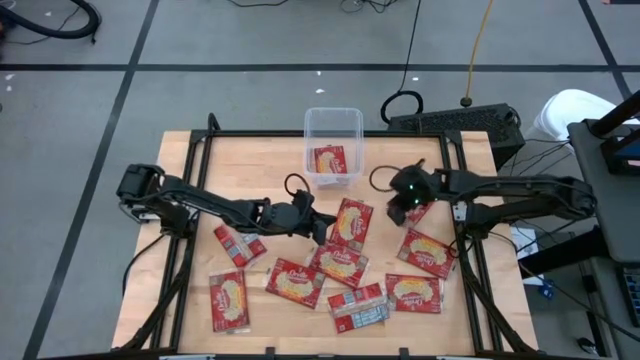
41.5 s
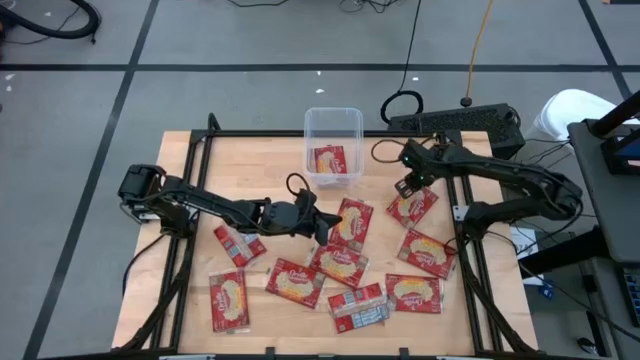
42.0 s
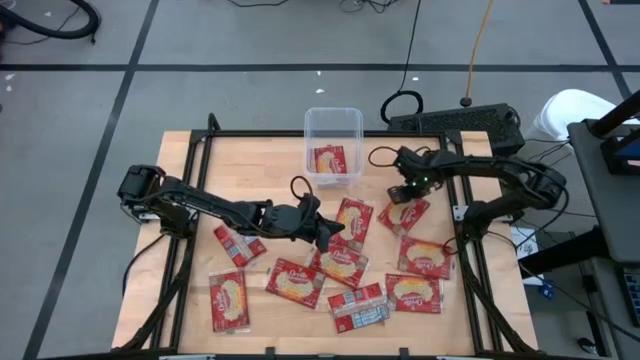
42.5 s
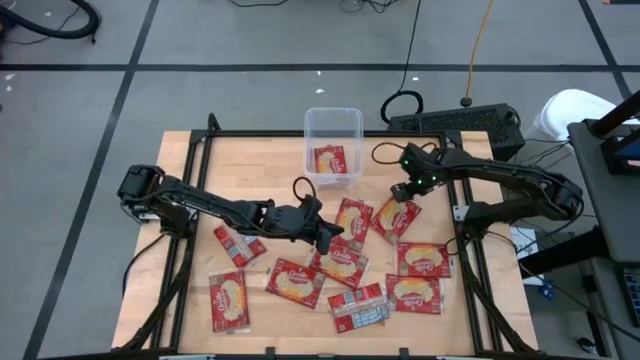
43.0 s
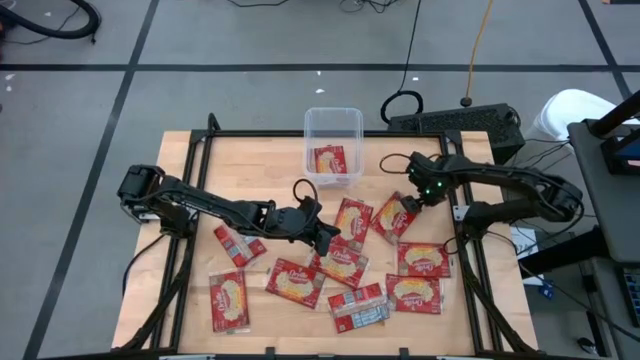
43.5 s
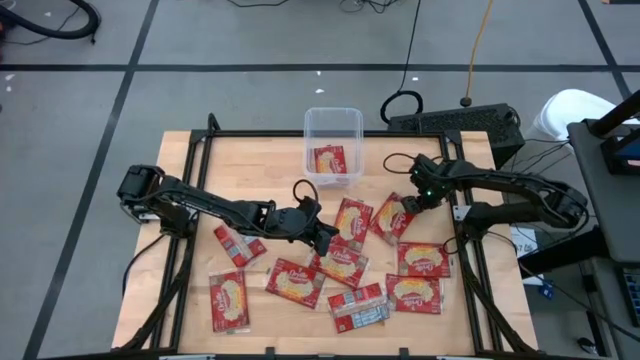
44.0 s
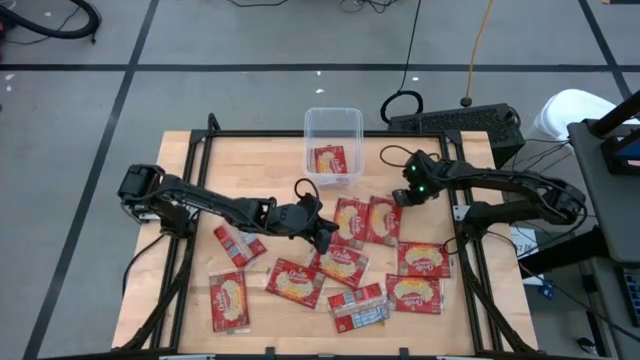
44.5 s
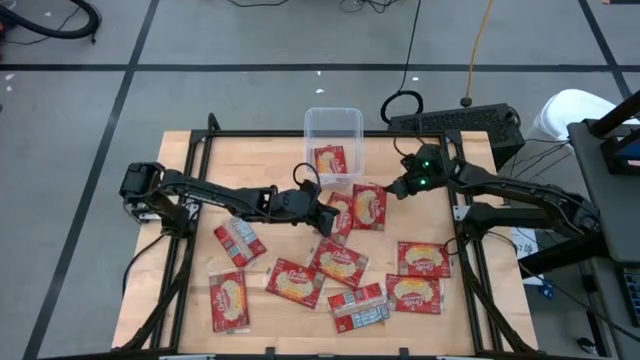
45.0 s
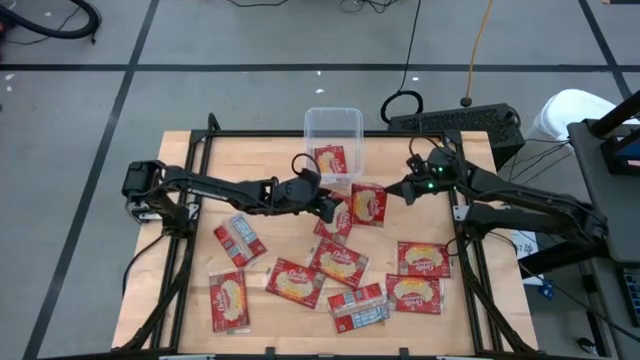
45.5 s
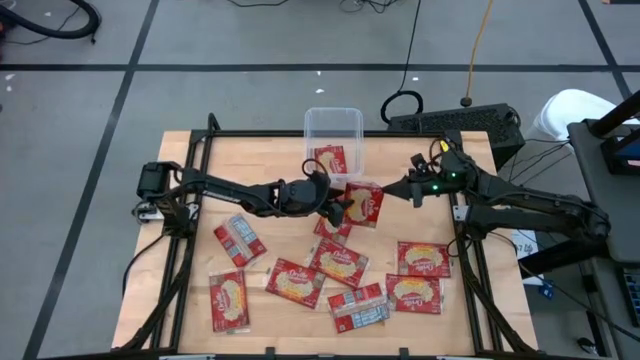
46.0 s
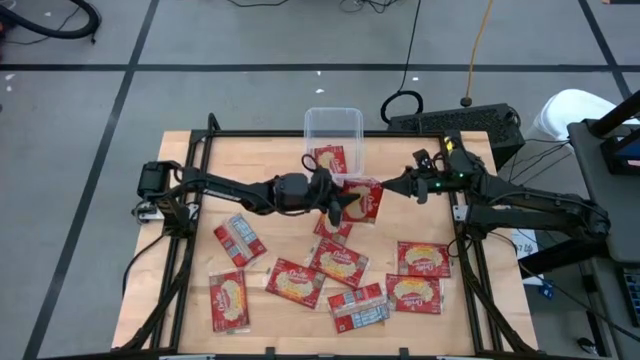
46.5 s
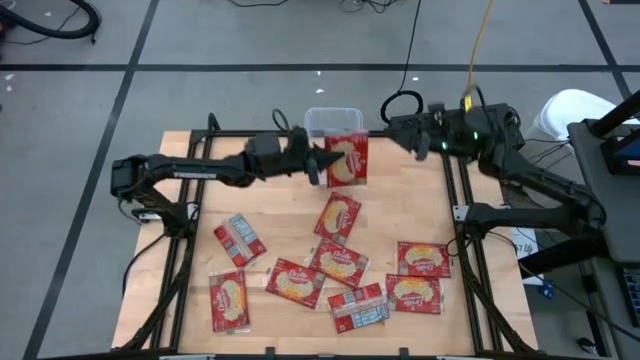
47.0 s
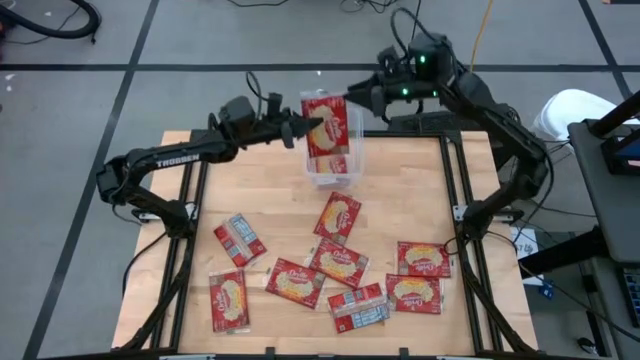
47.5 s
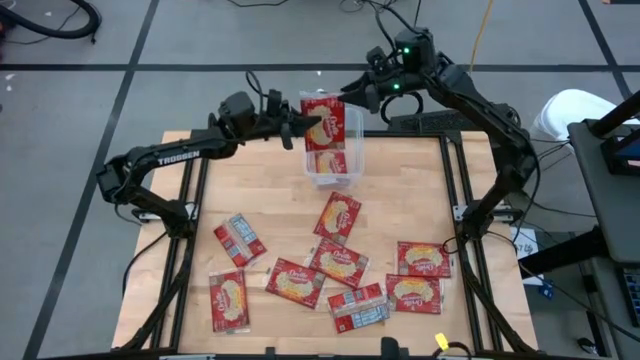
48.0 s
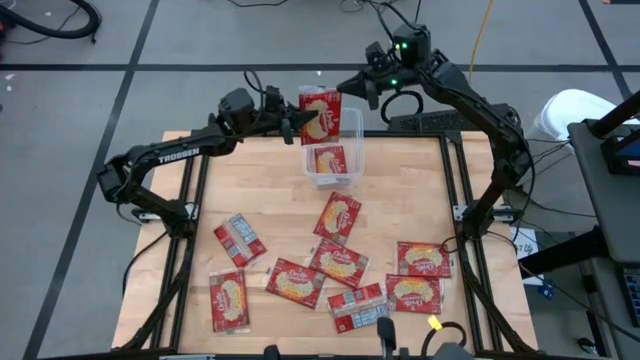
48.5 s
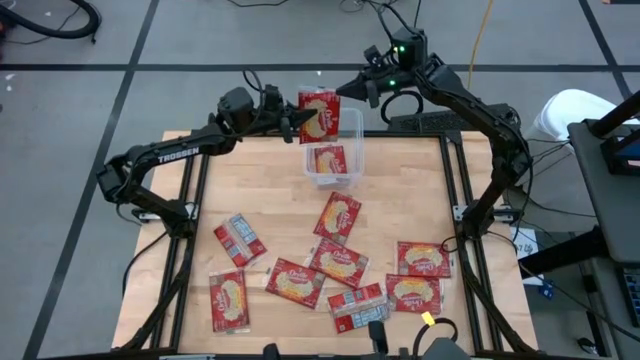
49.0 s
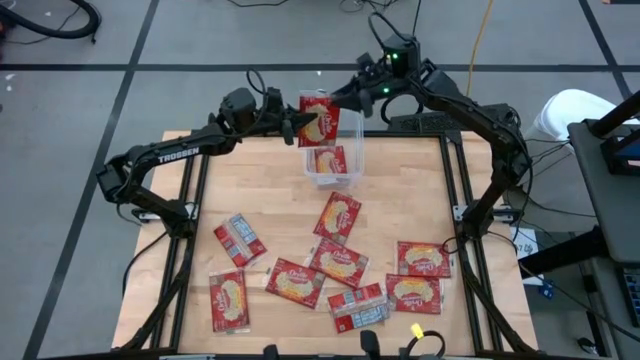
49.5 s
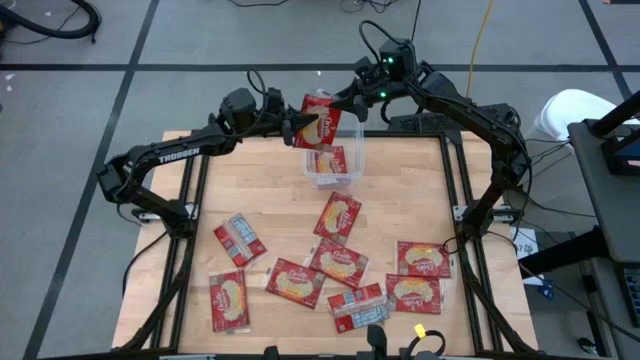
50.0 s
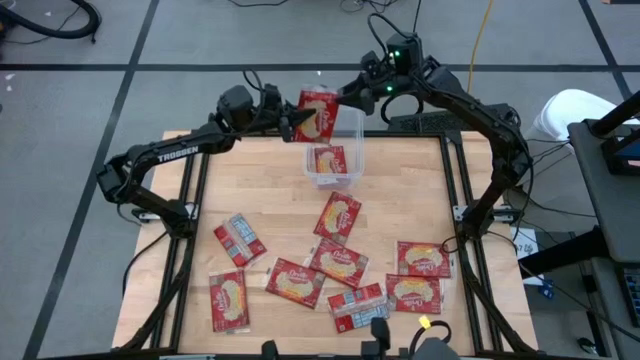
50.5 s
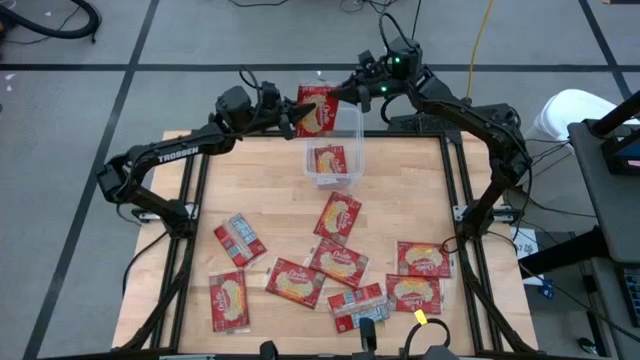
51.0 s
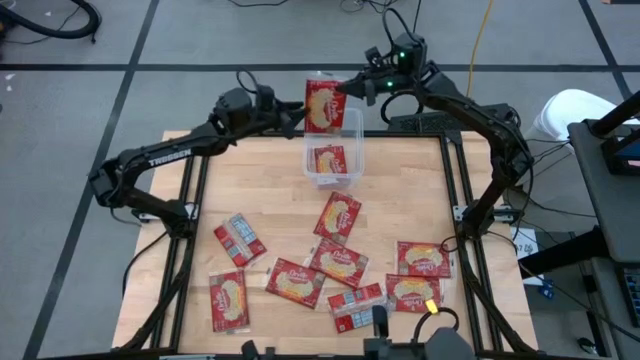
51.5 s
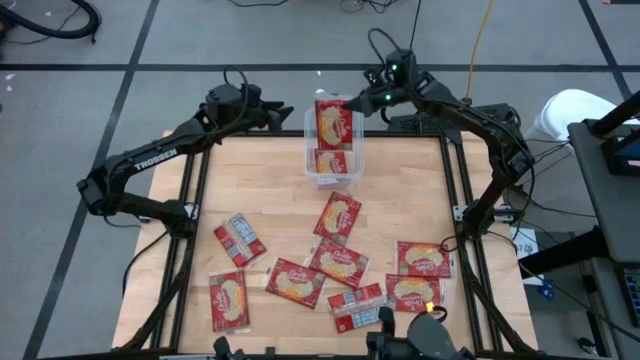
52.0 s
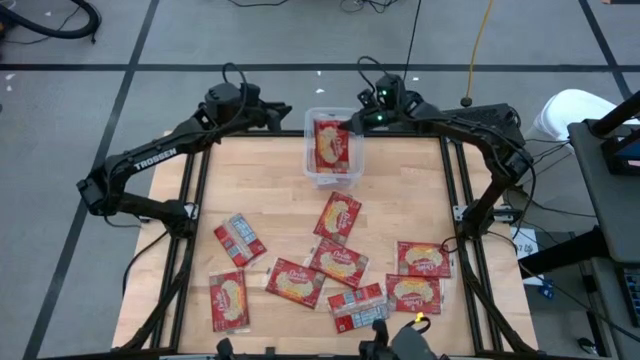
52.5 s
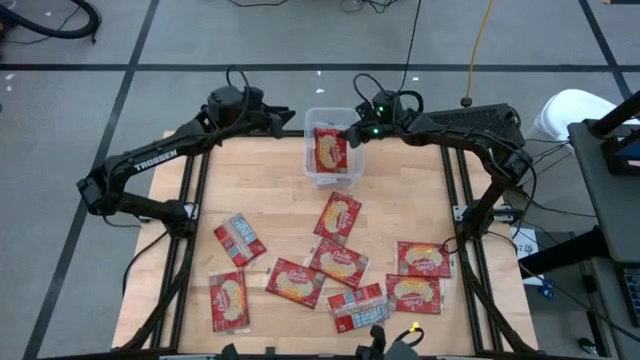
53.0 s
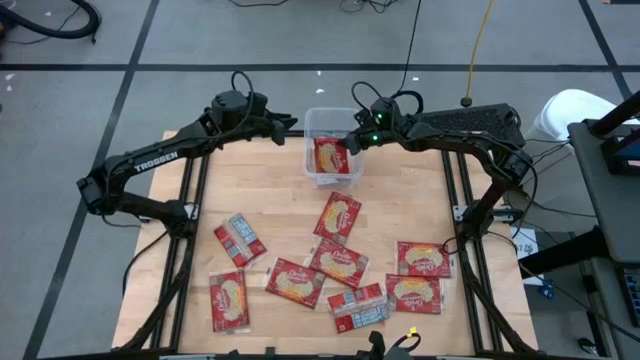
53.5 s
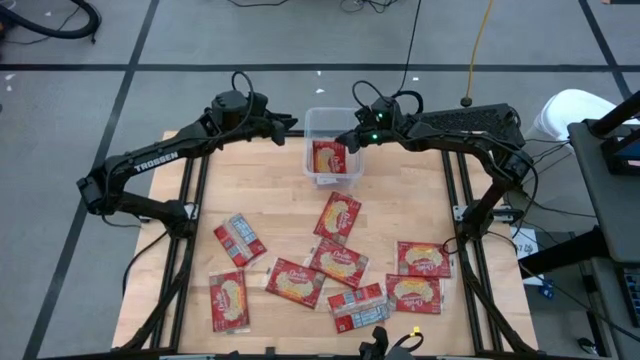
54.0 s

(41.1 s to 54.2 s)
Task: Sort popcorn bags into baskets
Put the red popcorn bag into the transparent container

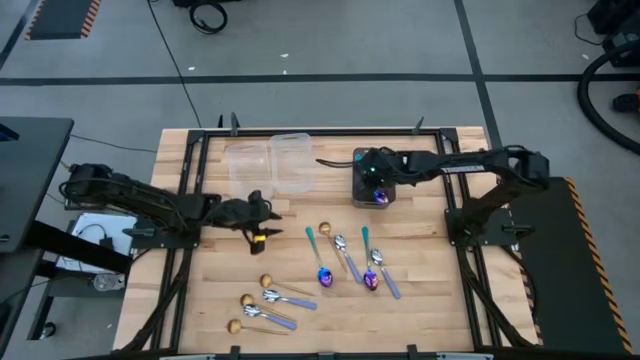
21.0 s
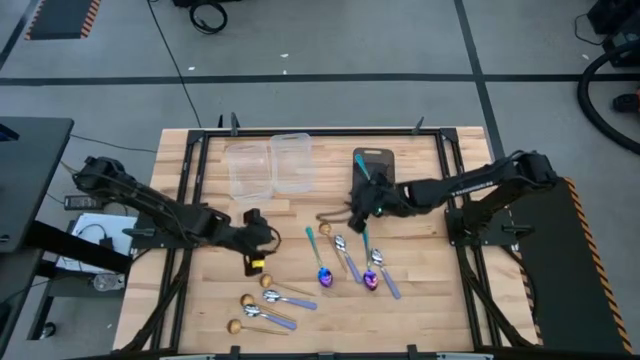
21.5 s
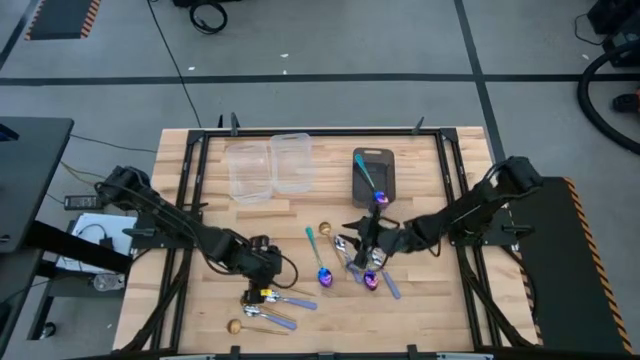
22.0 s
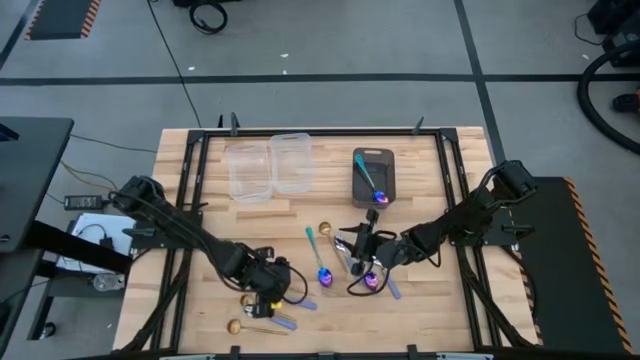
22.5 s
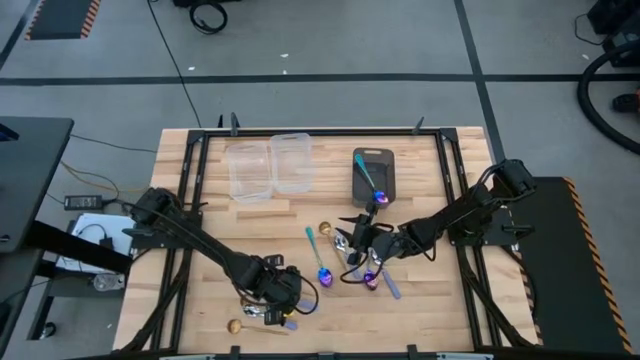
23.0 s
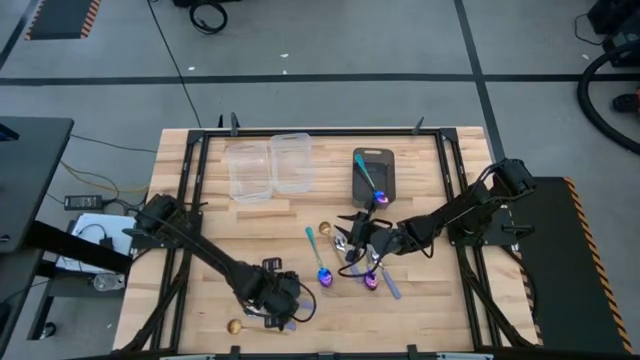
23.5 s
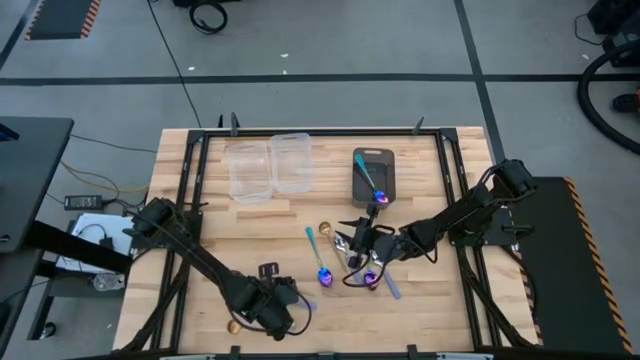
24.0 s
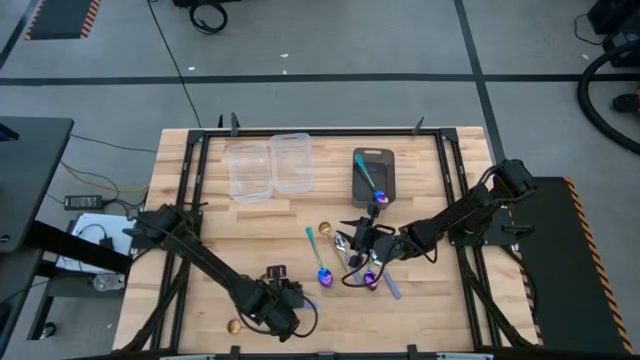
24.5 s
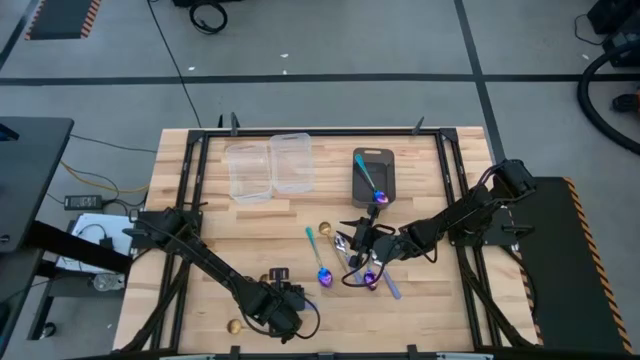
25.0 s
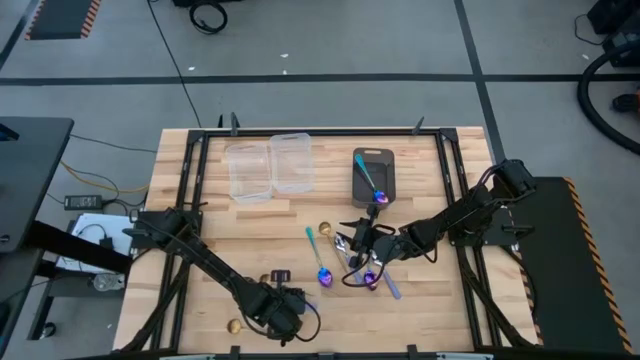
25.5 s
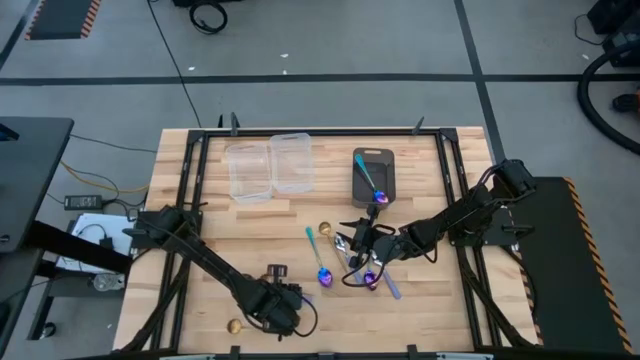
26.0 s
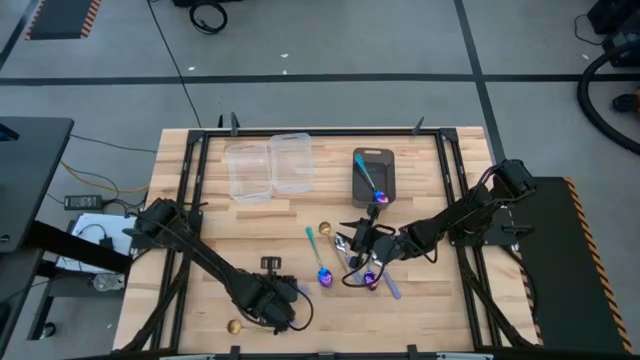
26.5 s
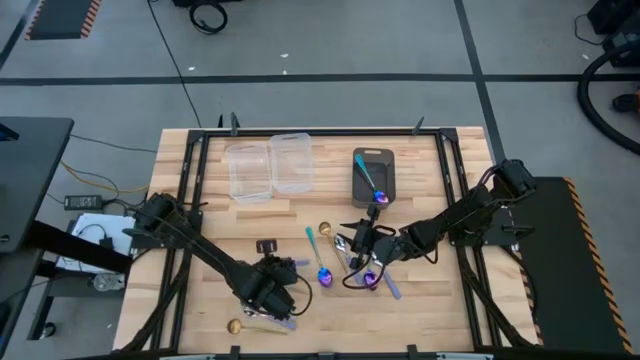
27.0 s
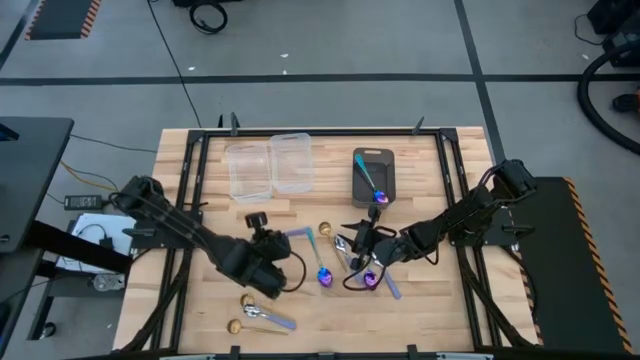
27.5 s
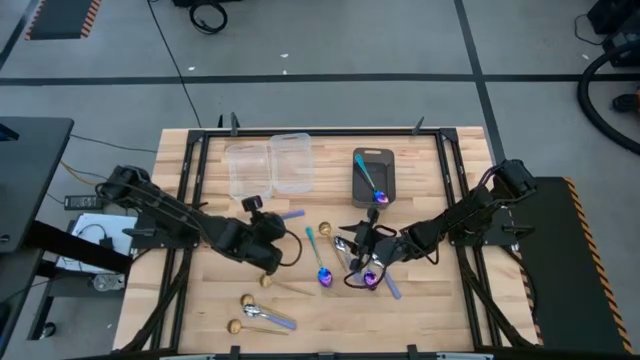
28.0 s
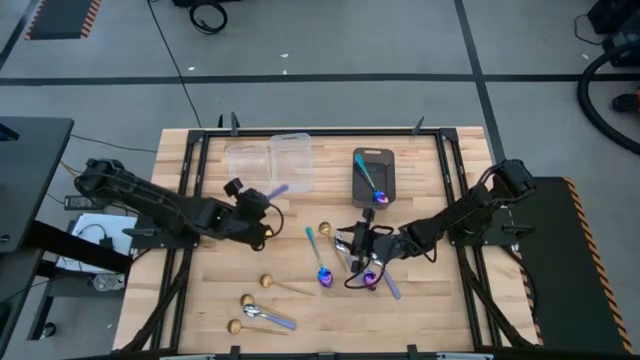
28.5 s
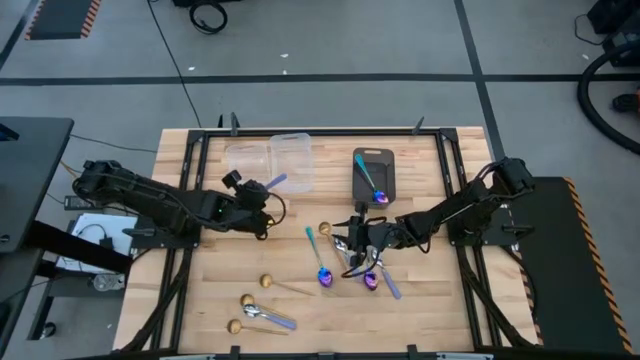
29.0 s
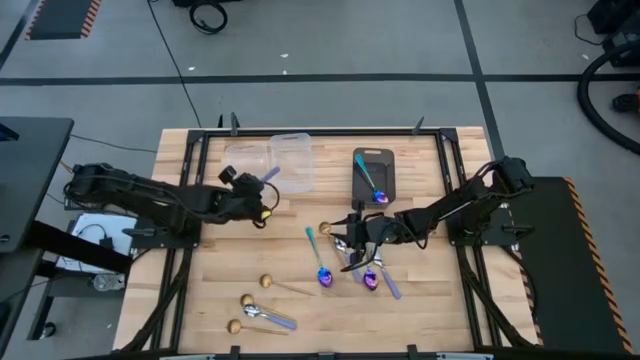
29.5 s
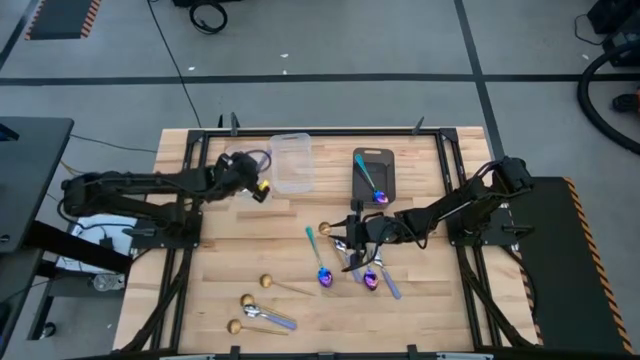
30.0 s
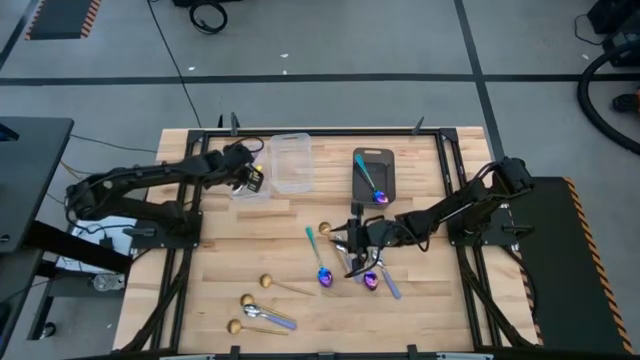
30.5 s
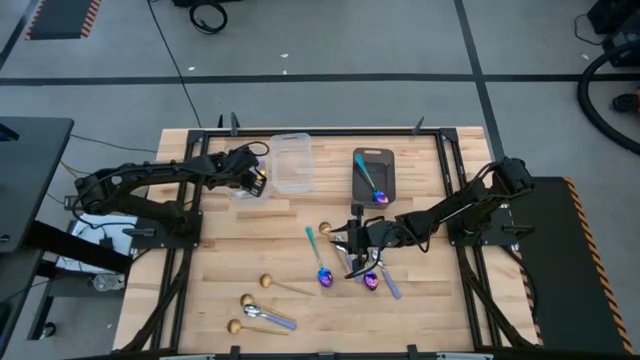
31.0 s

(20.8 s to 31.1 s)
Task: Sort silverware by color (type)
Put the purple spoon into the left transparent bin
